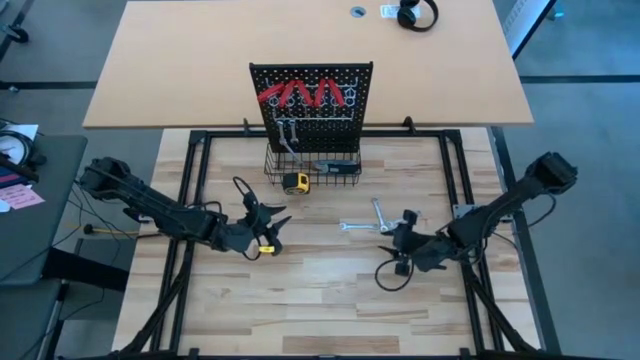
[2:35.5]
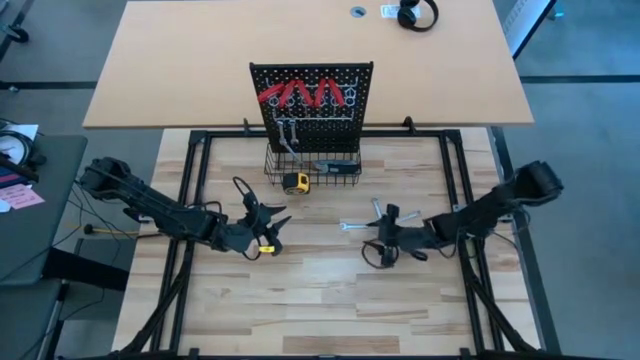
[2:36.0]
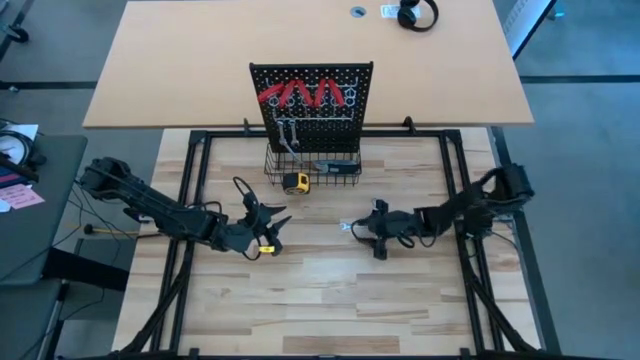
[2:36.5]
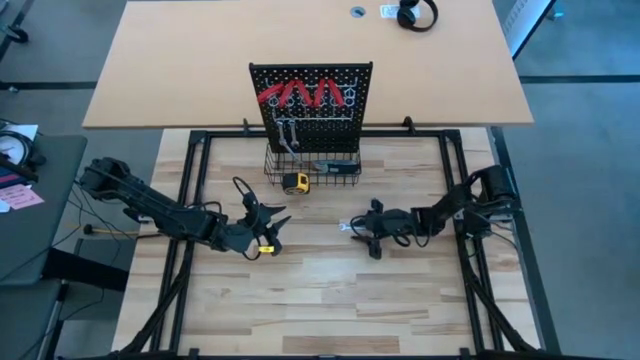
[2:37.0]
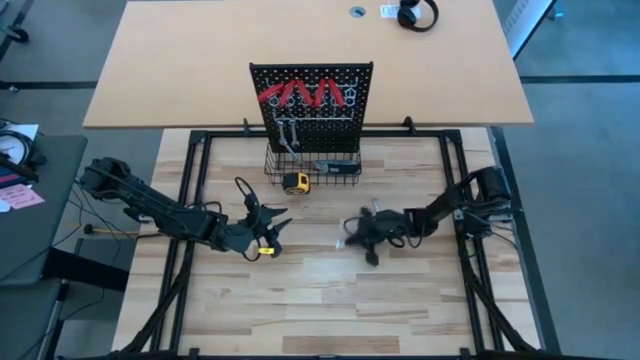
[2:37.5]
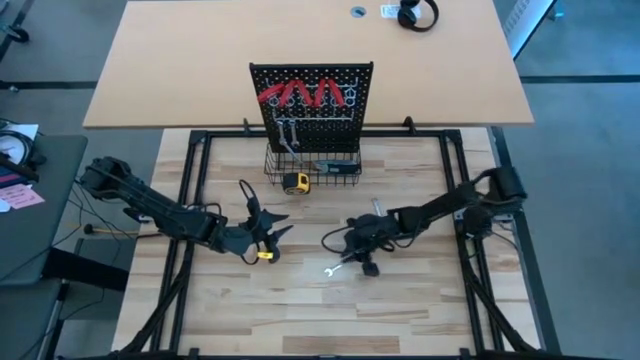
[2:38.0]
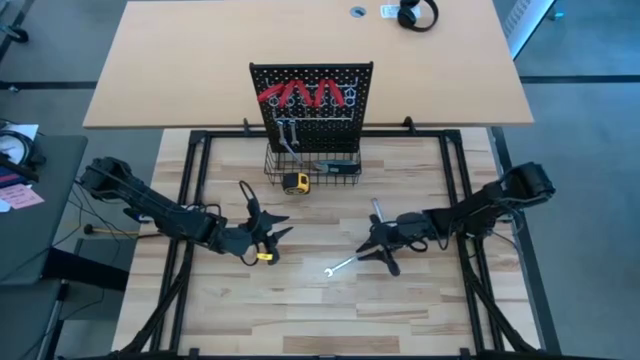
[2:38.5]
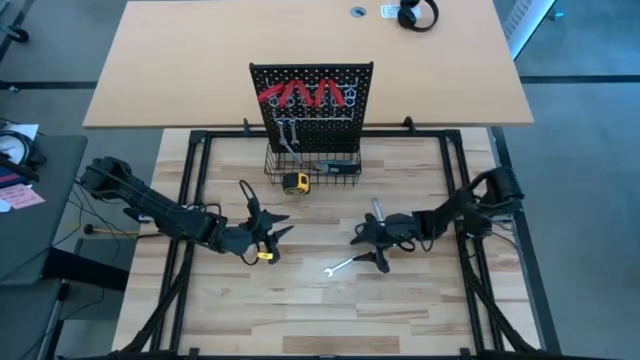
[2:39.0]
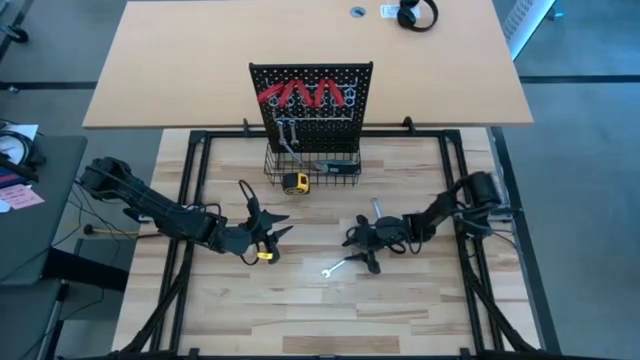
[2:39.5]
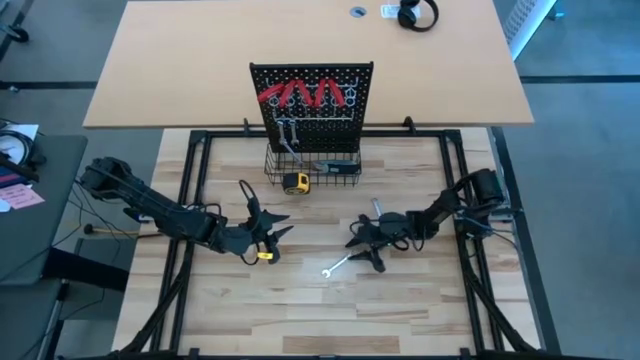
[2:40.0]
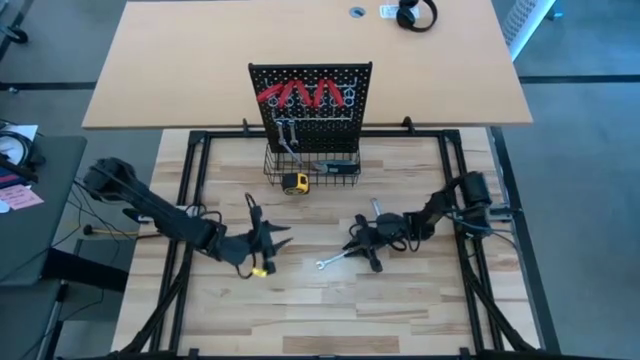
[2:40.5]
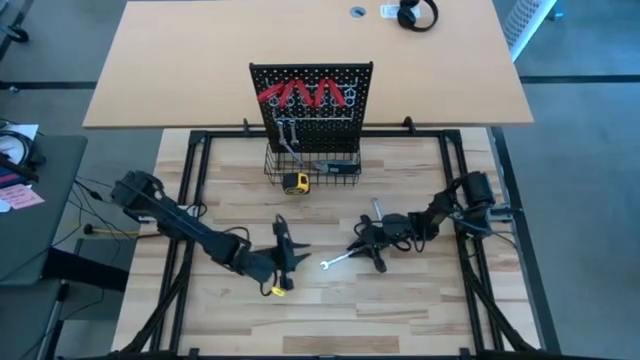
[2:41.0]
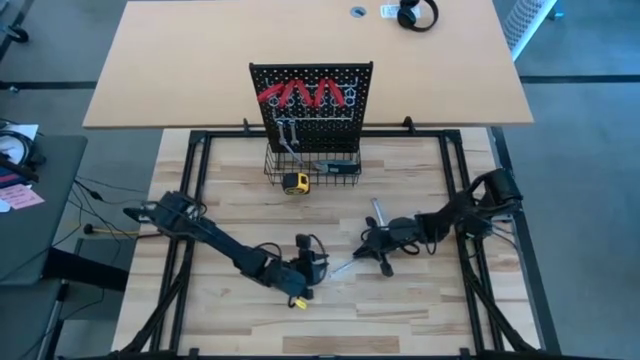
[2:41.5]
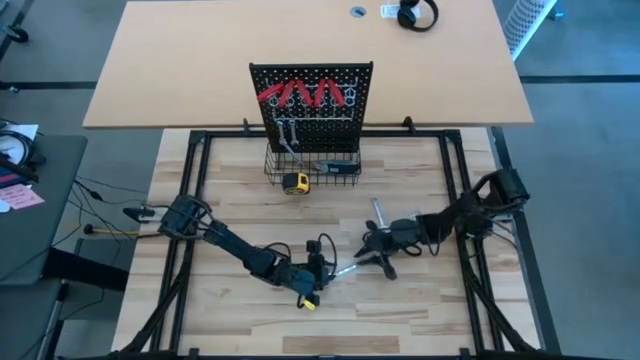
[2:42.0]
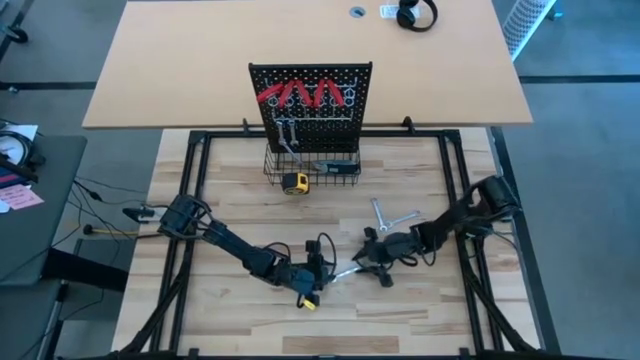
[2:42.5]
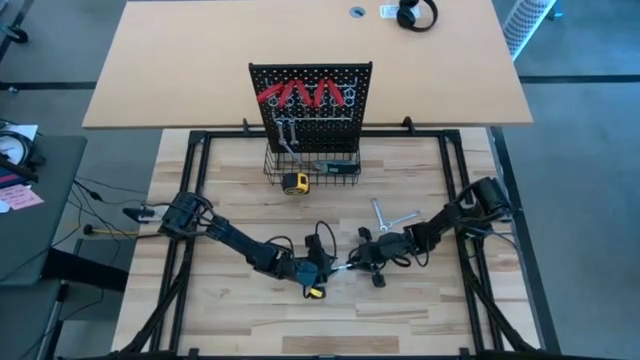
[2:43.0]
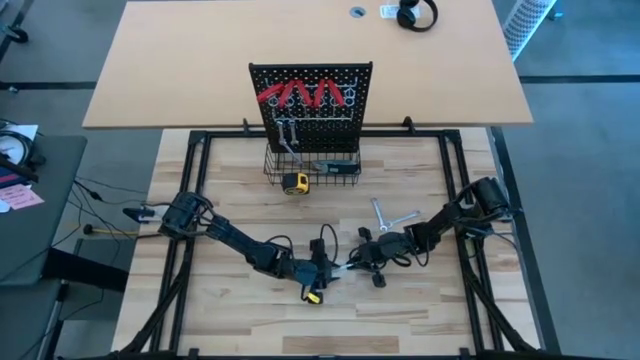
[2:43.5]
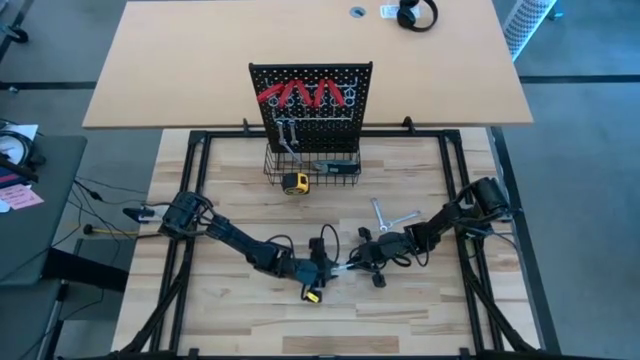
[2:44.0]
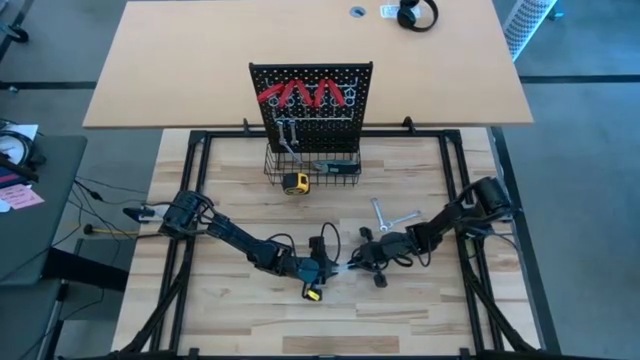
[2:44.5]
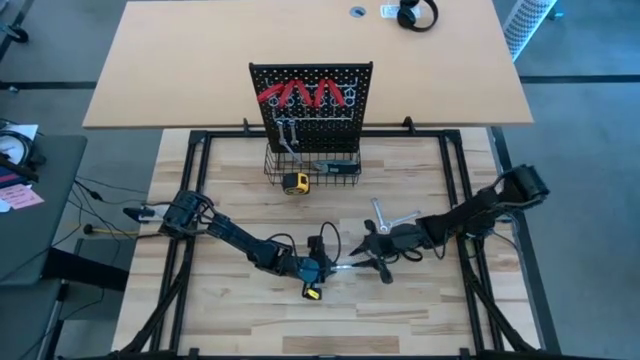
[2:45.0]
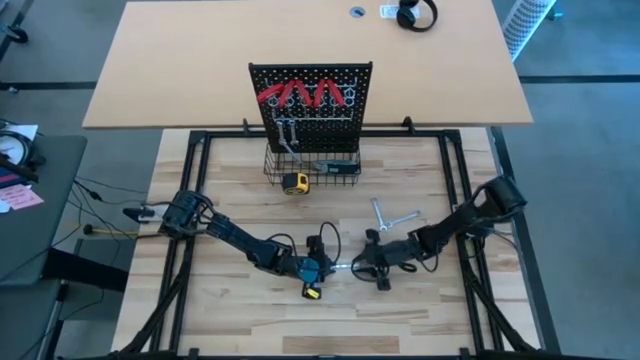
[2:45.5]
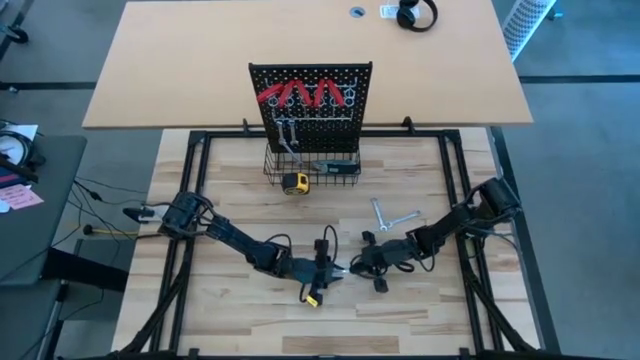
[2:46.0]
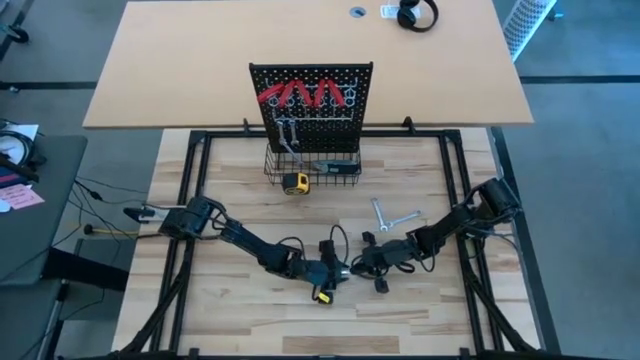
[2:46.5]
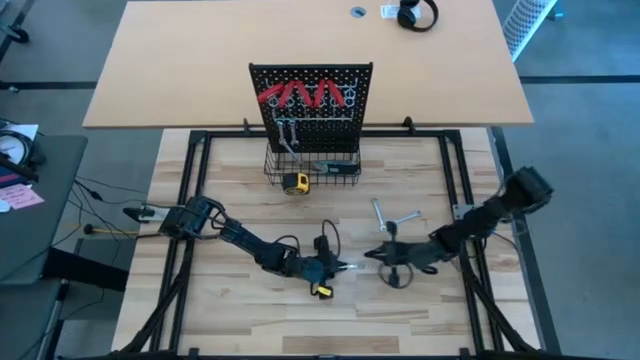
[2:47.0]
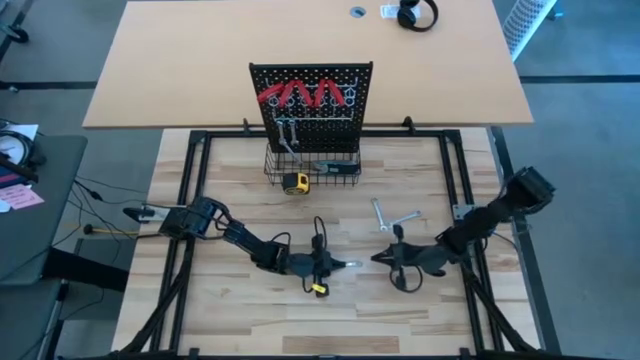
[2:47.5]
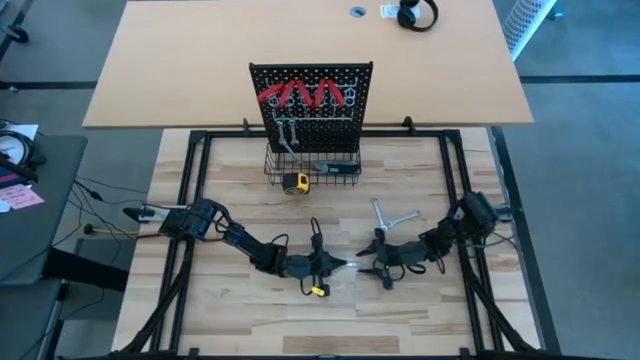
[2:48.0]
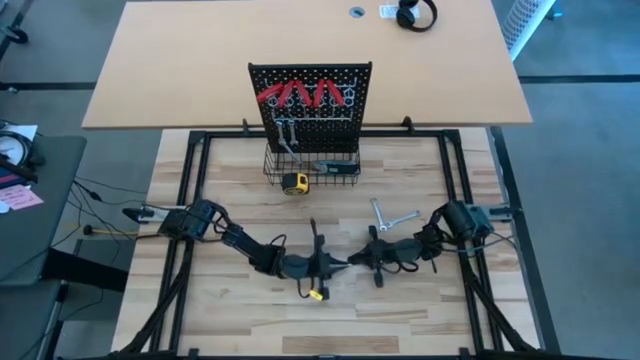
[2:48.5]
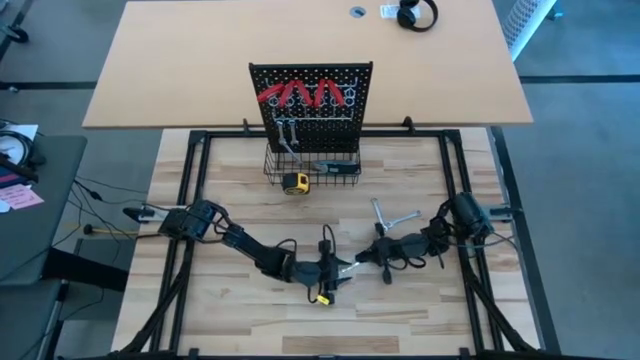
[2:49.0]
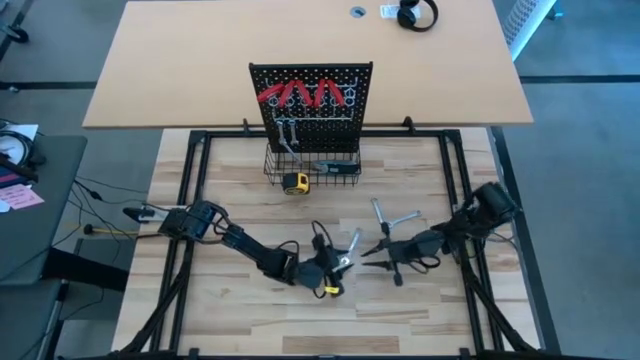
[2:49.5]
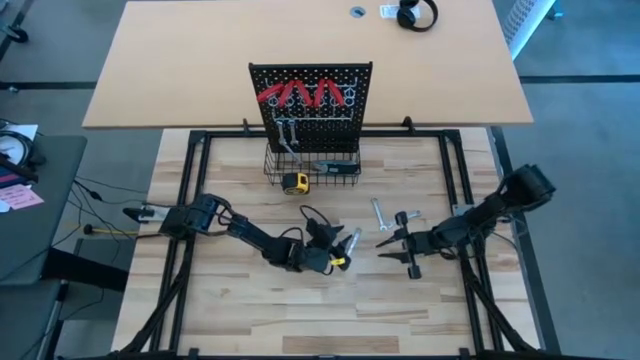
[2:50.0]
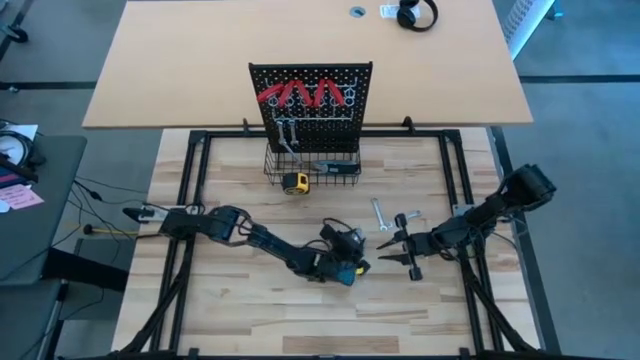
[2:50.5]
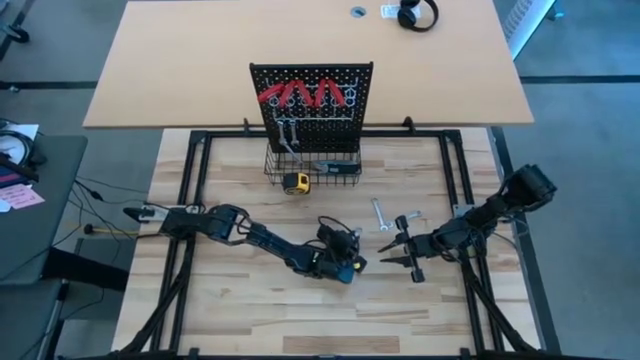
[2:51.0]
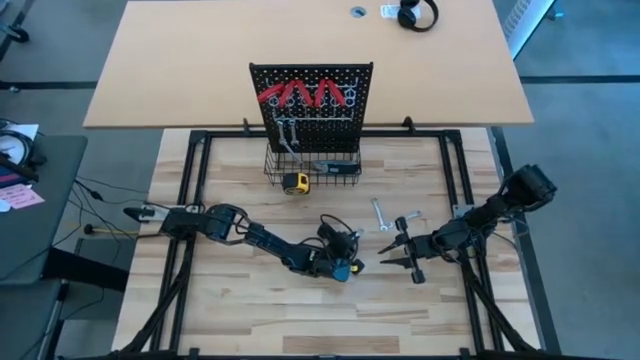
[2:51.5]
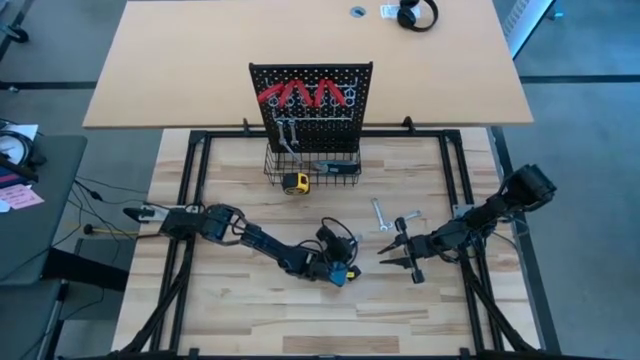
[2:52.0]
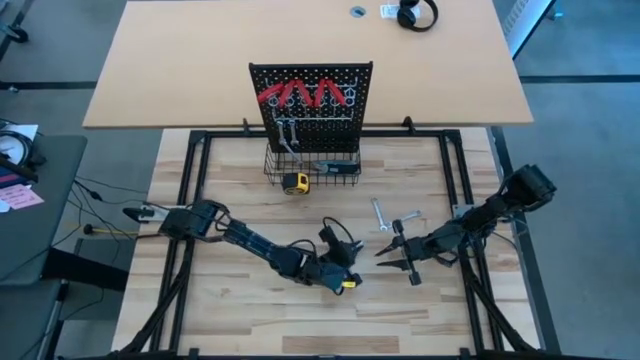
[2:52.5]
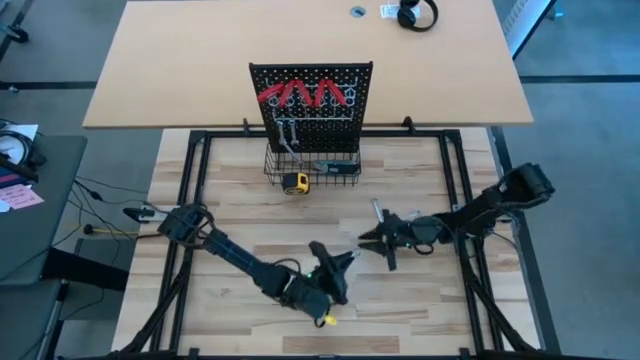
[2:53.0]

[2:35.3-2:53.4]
Task: Hang tools onto peg board
Hang the wrench into the pegboard
